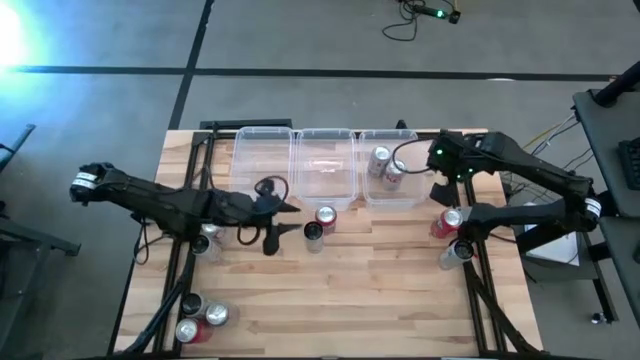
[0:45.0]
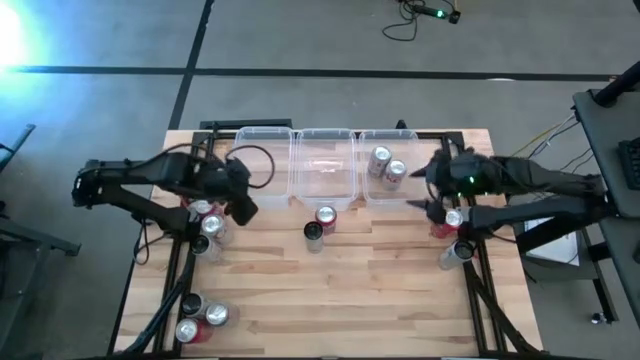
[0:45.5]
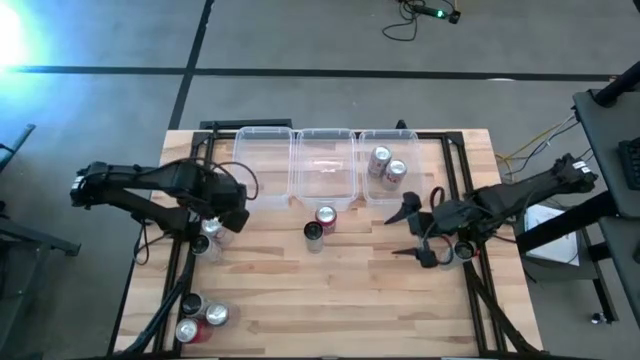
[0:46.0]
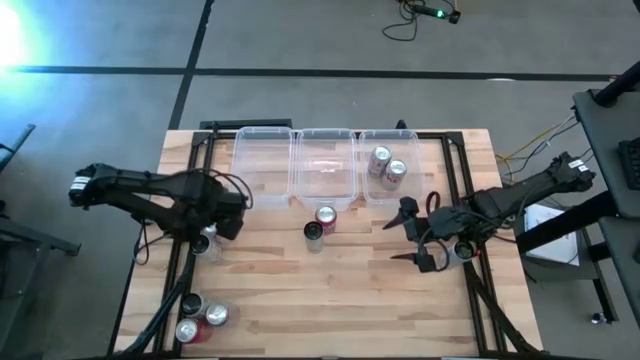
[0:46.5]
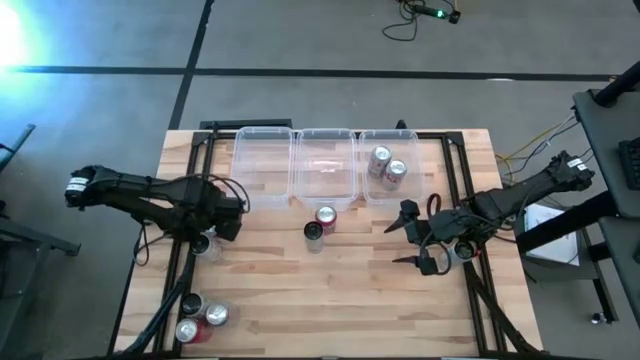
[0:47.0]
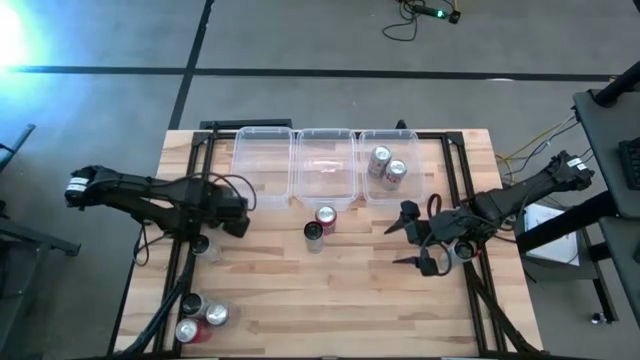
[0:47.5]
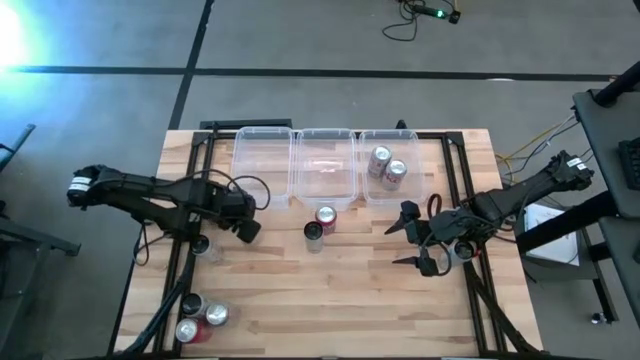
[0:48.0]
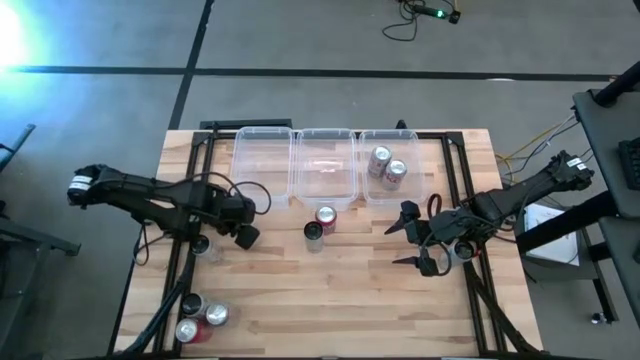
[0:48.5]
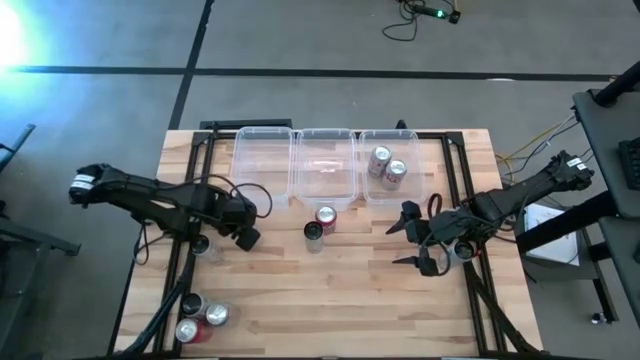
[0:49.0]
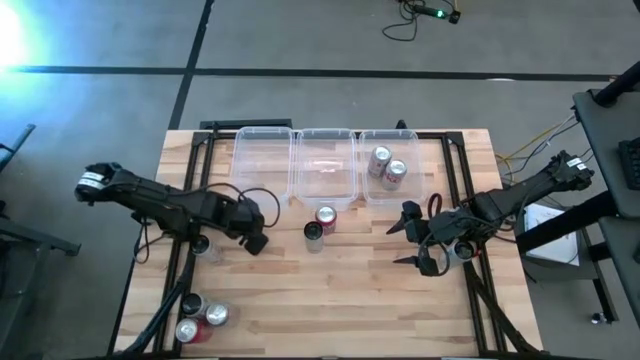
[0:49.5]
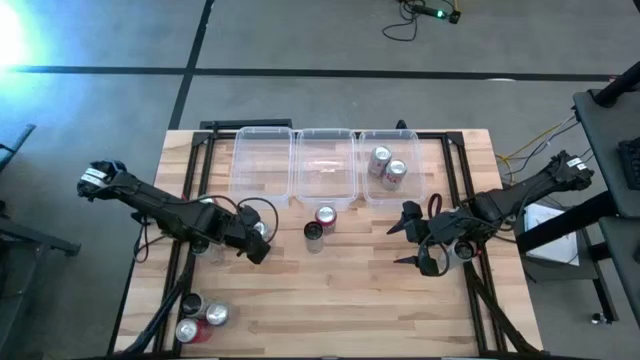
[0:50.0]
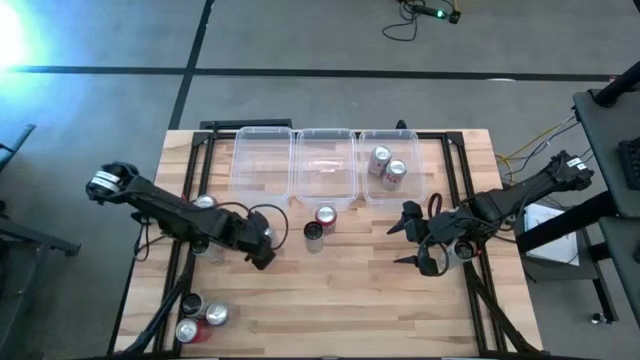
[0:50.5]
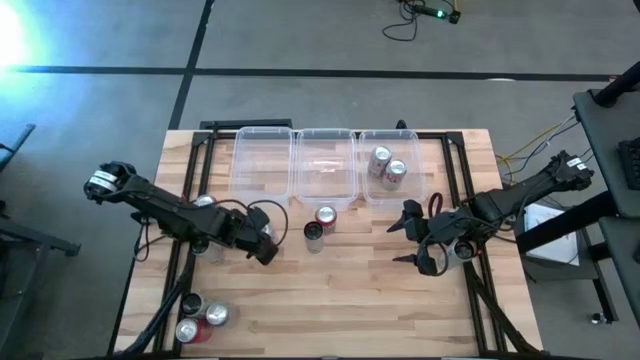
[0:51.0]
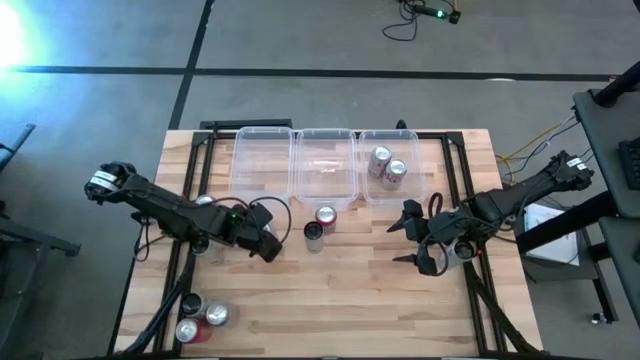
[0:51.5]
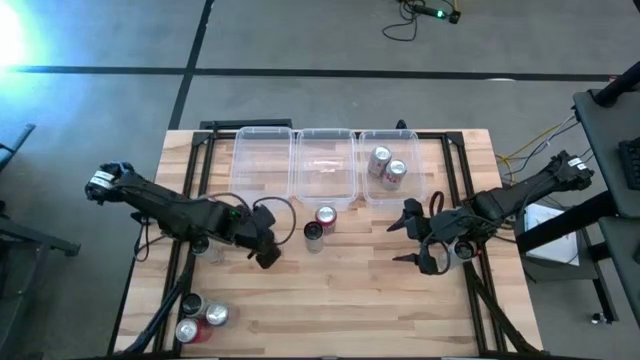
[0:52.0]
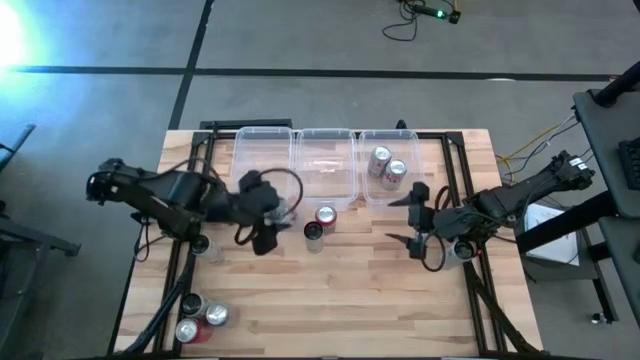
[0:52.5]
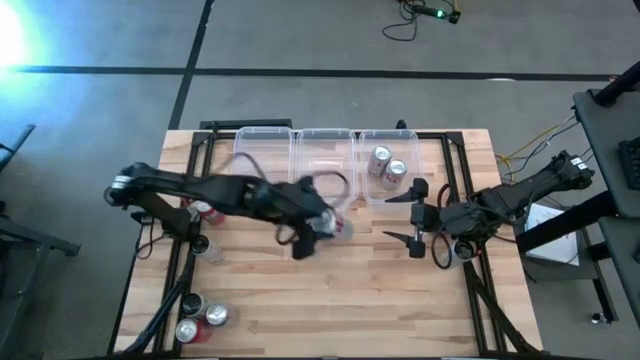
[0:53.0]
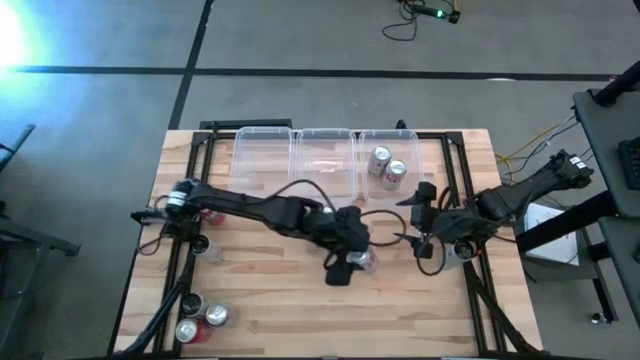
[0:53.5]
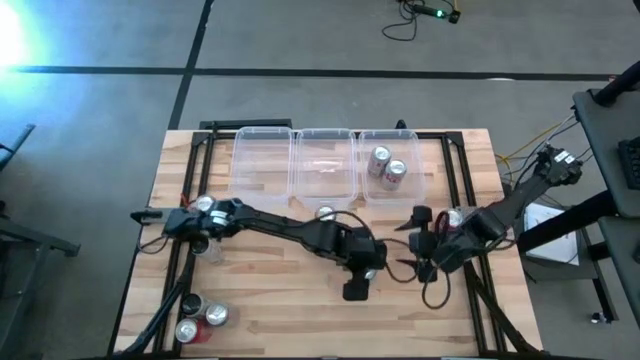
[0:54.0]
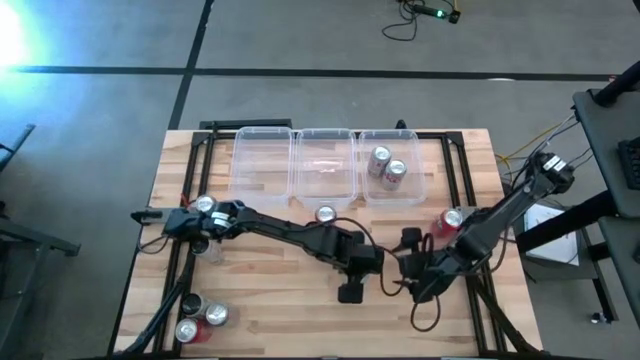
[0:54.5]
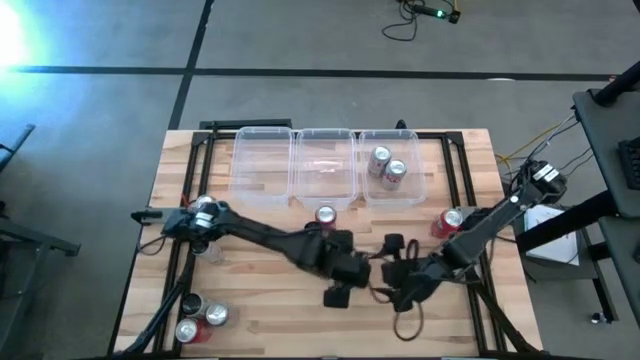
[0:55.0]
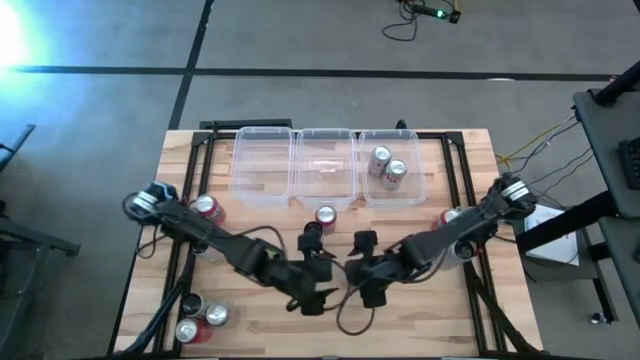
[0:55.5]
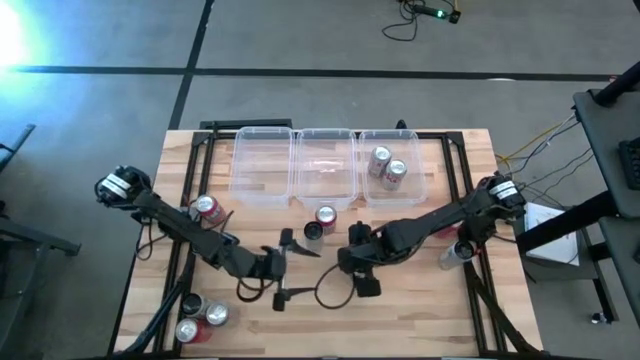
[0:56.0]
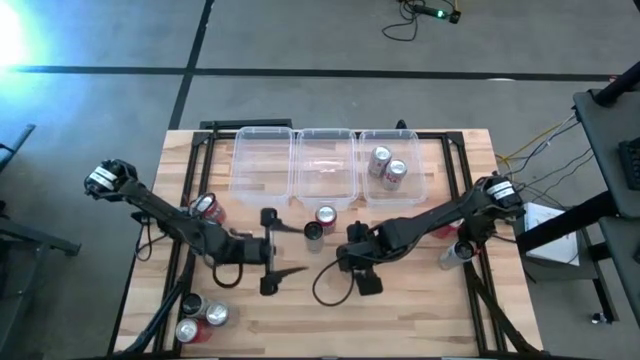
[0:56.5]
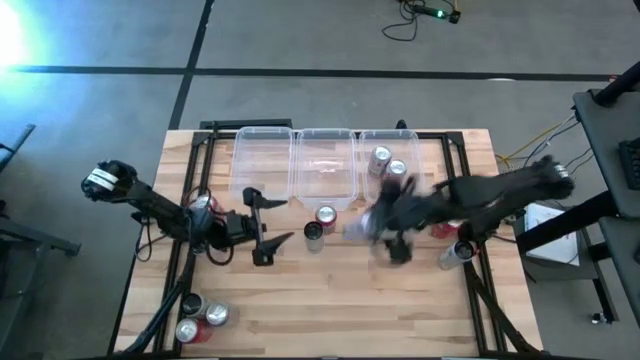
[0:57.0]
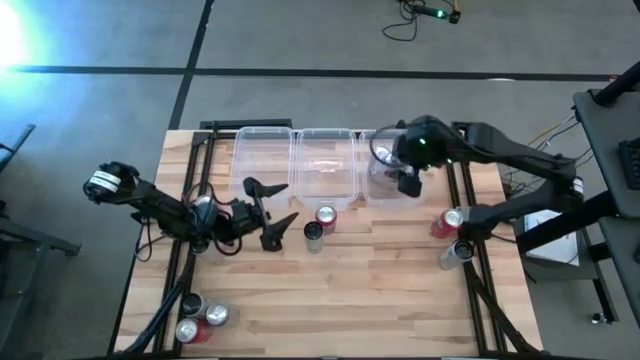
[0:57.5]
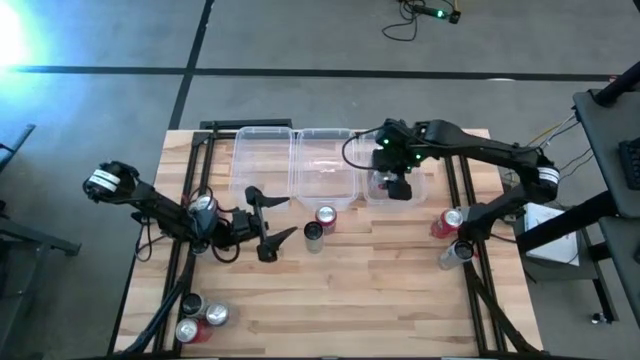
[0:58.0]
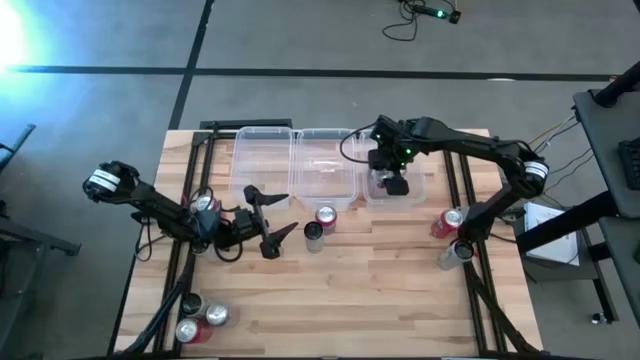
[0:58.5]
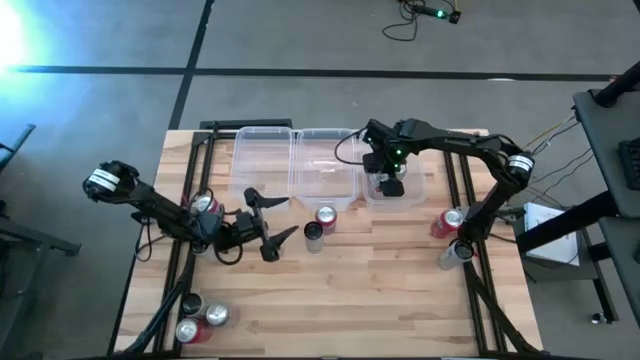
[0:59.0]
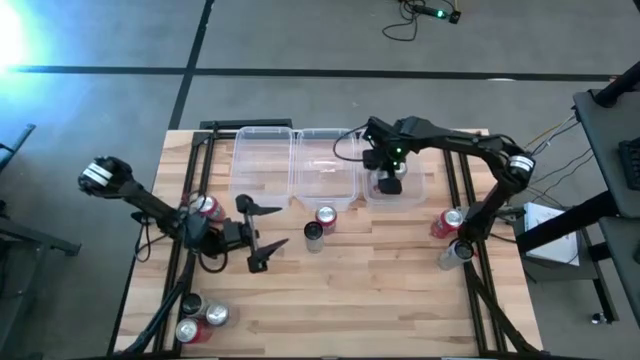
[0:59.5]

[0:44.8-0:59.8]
Task: Sort soda cans
Put the top red silver soda can into the right transparent bin

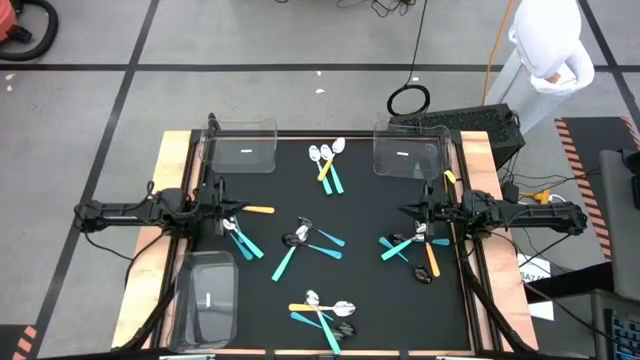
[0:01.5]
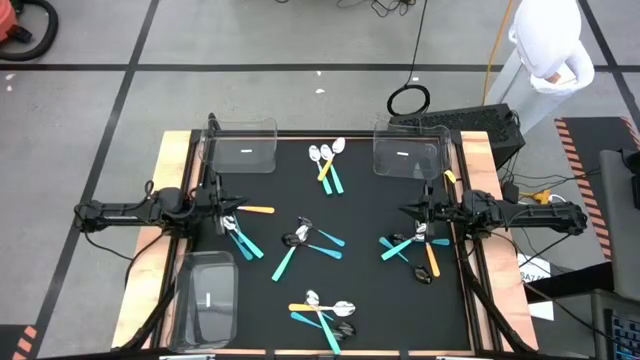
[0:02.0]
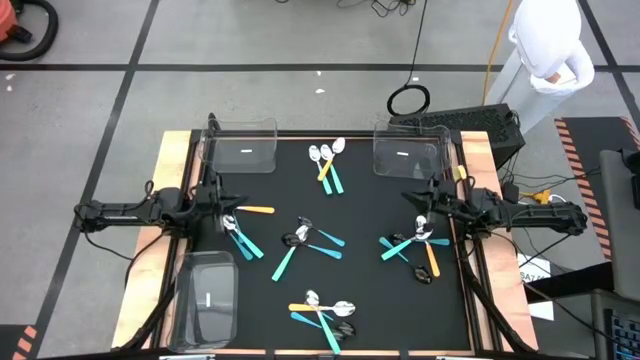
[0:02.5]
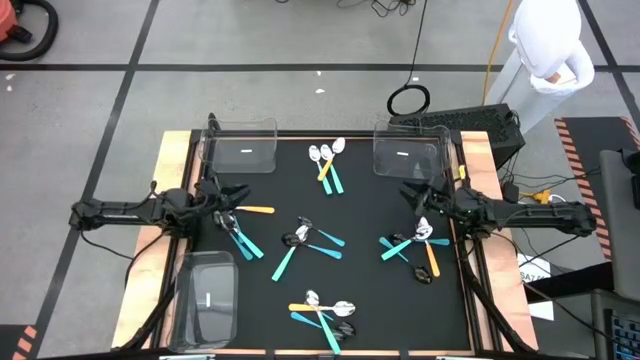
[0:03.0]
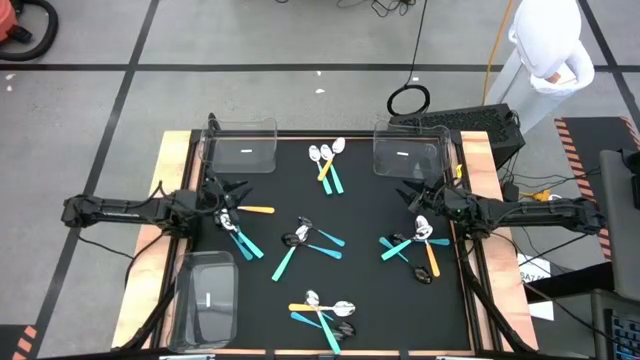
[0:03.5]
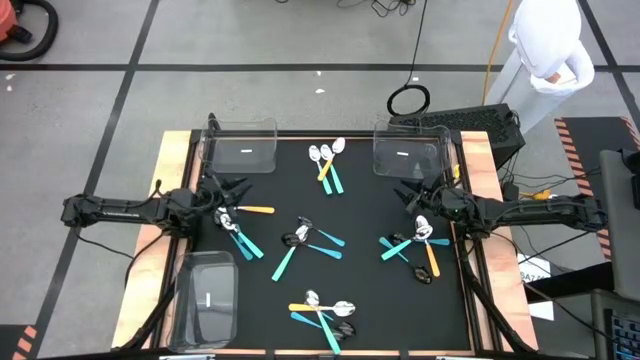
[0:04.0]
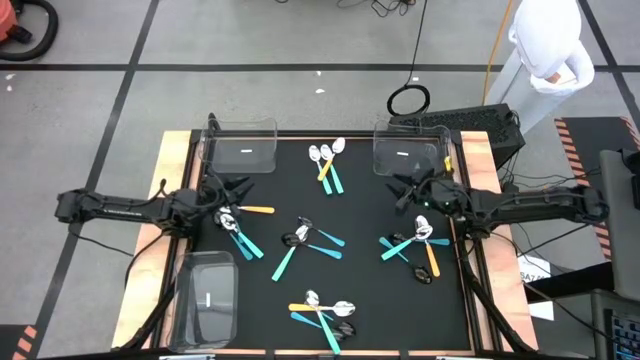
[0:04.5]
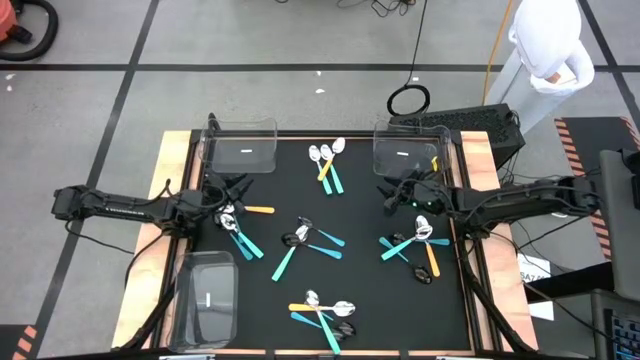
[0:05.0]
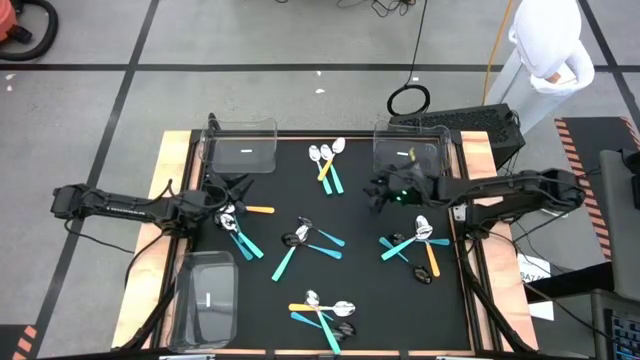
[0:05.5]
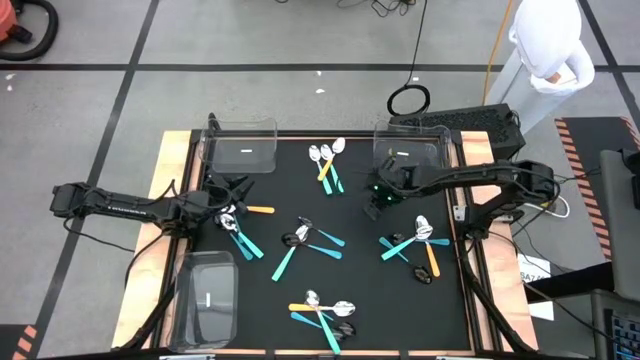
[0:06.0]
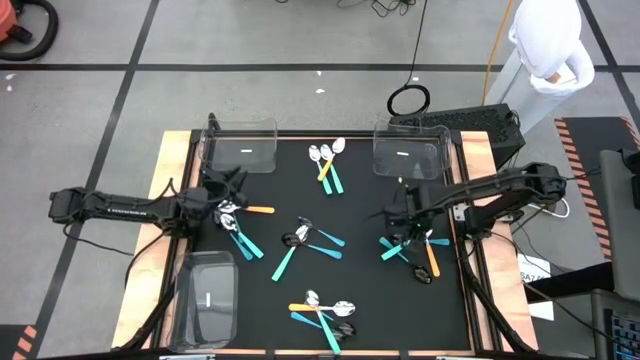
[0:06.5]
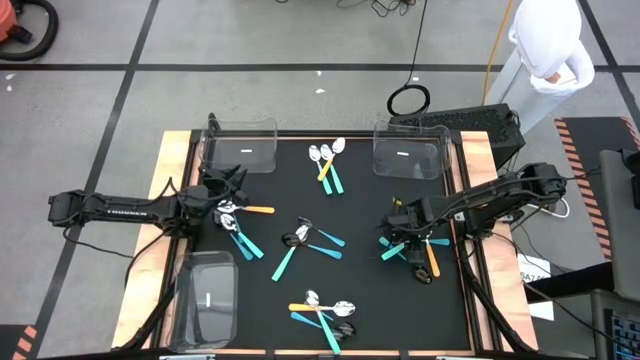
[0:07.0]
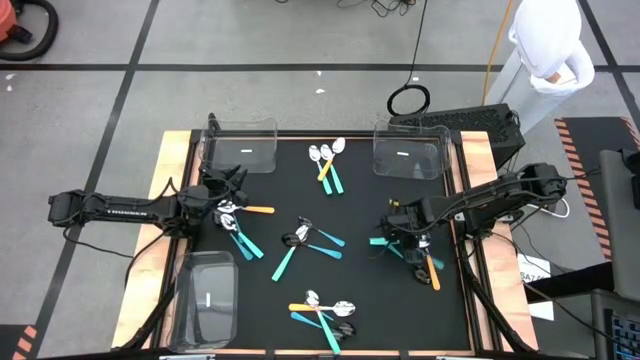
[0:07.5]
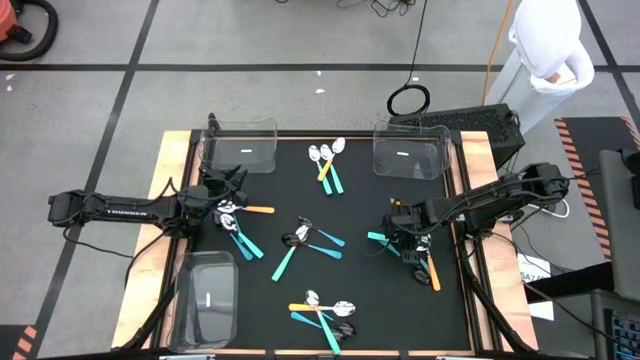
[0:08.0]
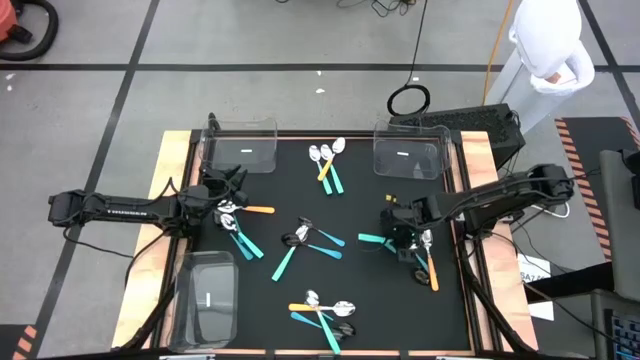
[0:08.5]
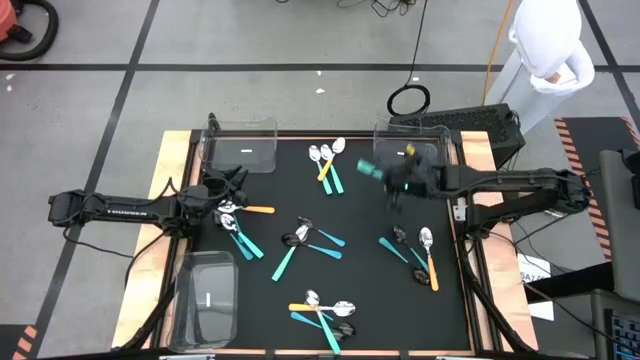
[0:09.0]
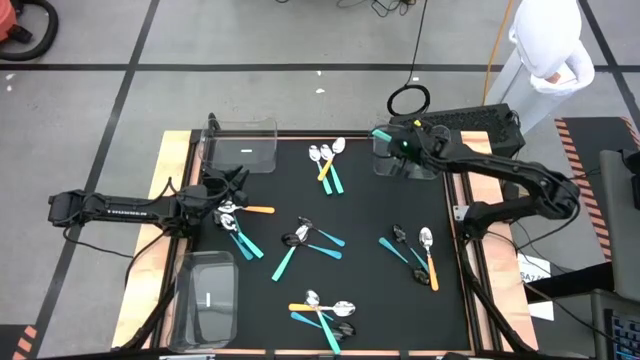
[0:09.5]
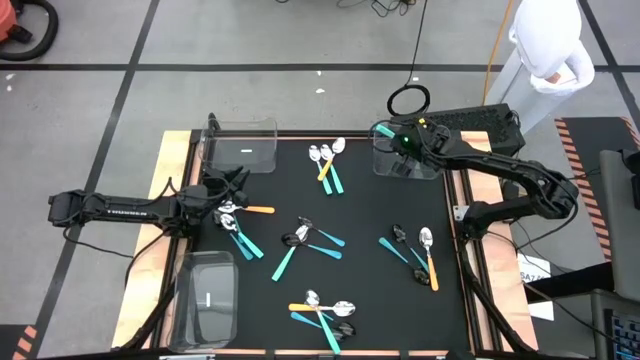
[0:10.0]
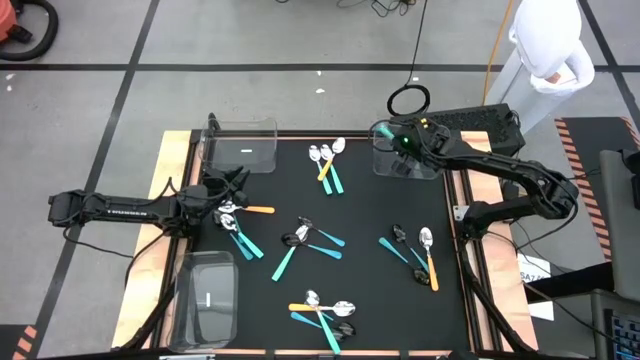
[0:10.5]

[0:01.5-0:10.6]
Task: Sort silverware by color (type)
Put the green spoon into the top right bin
